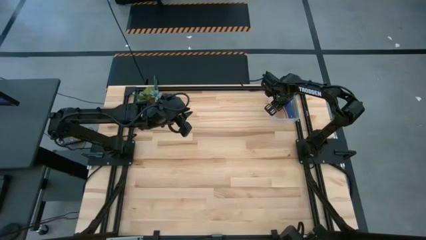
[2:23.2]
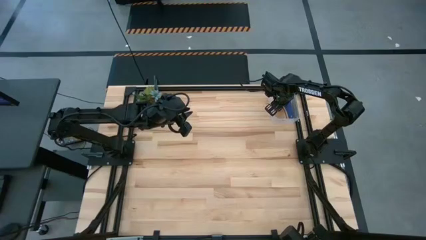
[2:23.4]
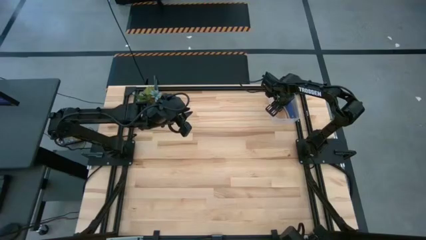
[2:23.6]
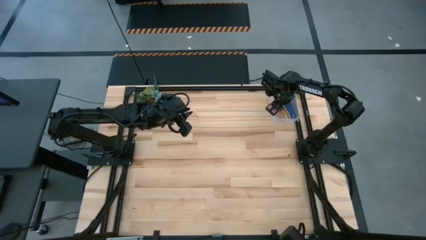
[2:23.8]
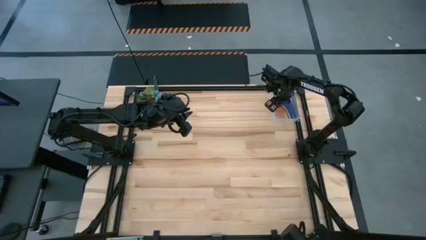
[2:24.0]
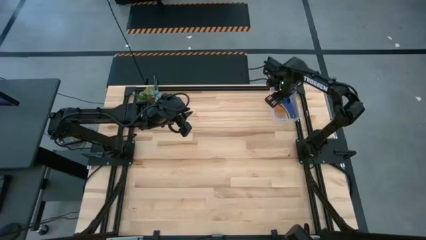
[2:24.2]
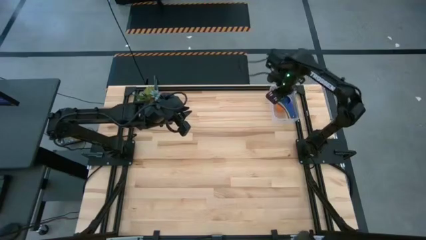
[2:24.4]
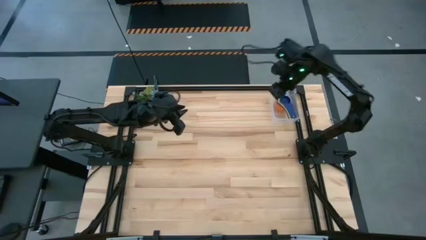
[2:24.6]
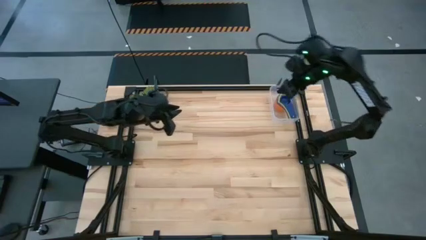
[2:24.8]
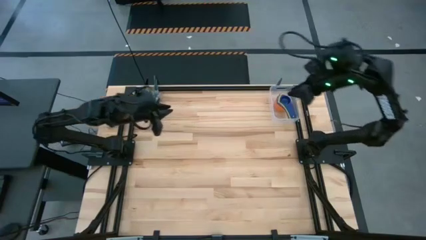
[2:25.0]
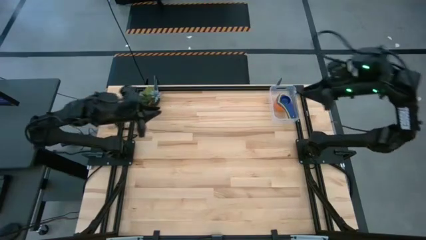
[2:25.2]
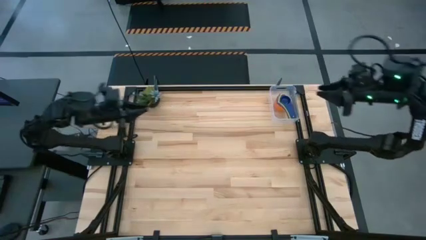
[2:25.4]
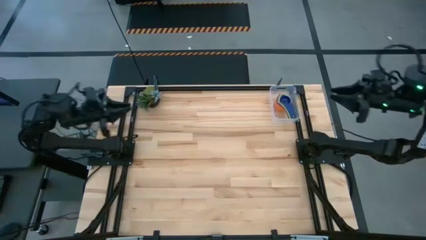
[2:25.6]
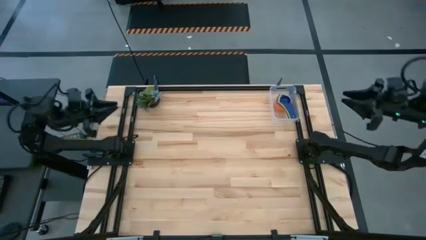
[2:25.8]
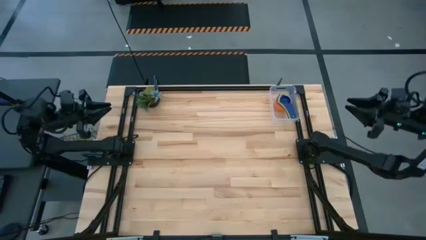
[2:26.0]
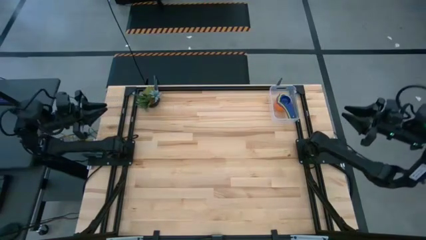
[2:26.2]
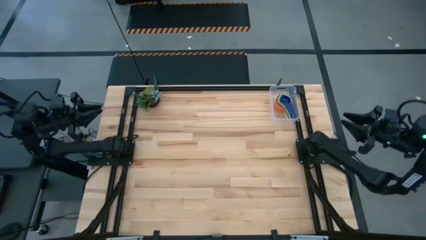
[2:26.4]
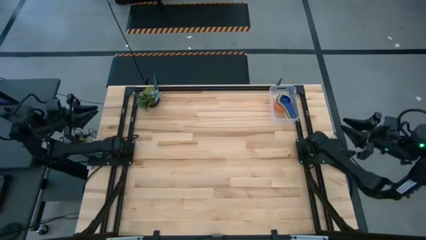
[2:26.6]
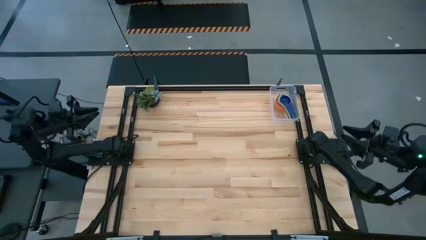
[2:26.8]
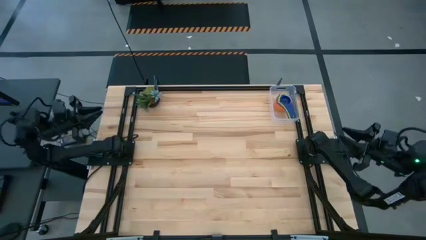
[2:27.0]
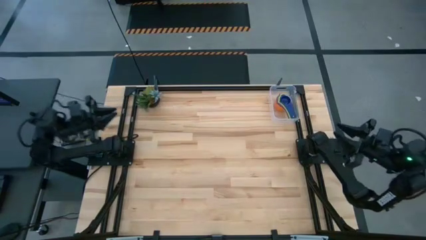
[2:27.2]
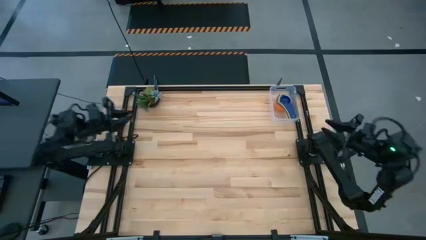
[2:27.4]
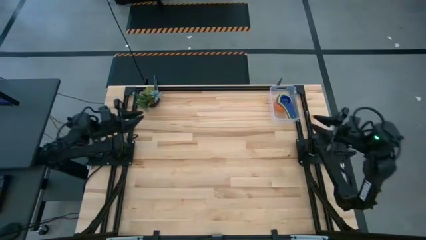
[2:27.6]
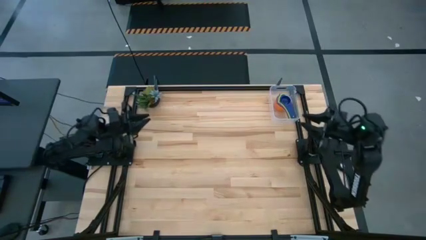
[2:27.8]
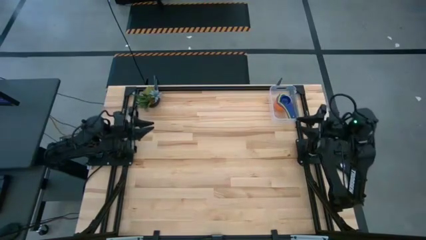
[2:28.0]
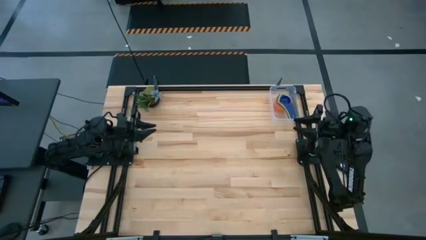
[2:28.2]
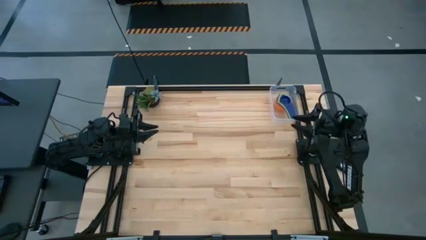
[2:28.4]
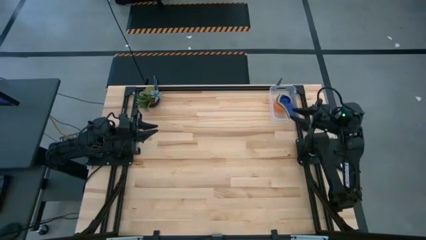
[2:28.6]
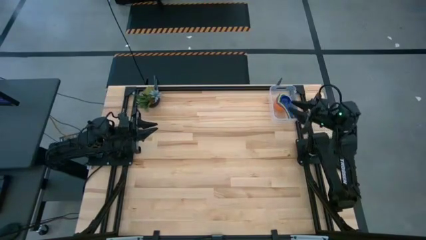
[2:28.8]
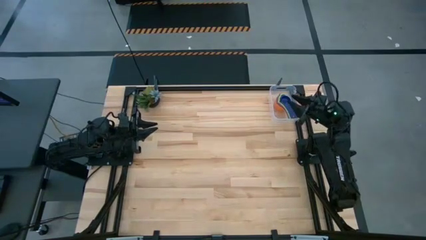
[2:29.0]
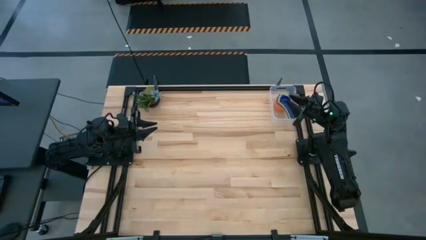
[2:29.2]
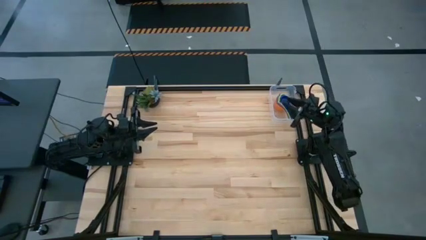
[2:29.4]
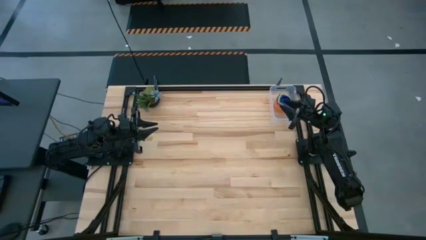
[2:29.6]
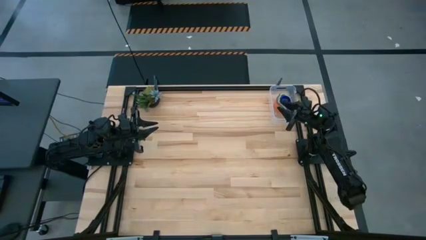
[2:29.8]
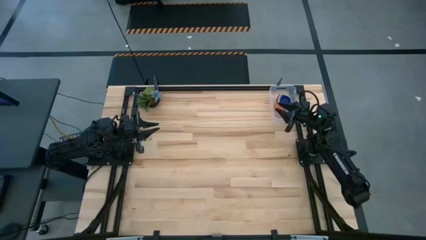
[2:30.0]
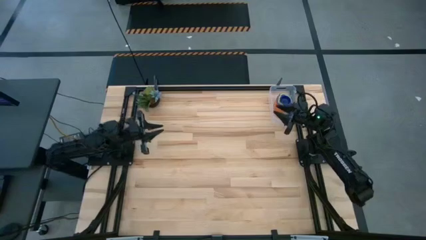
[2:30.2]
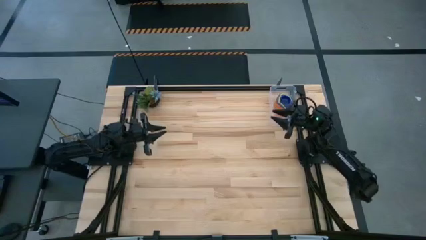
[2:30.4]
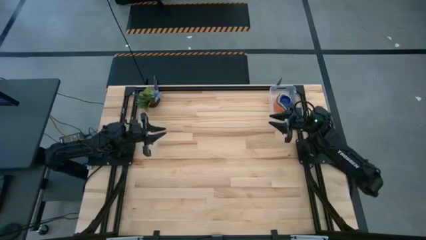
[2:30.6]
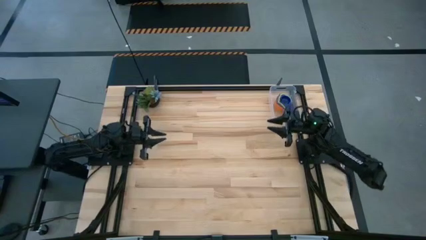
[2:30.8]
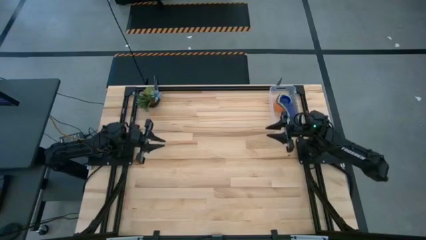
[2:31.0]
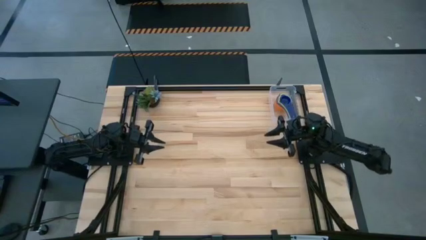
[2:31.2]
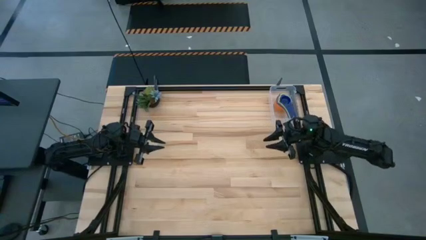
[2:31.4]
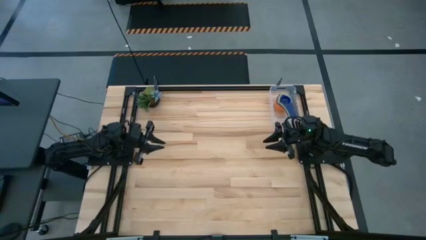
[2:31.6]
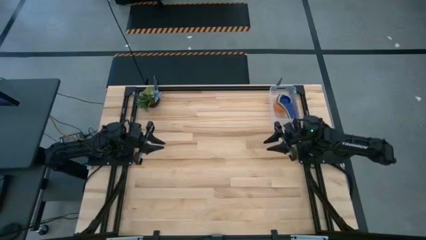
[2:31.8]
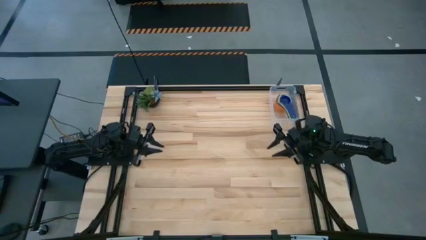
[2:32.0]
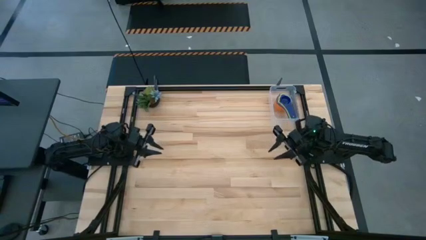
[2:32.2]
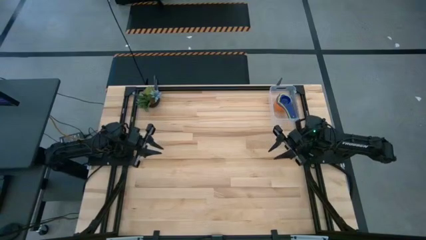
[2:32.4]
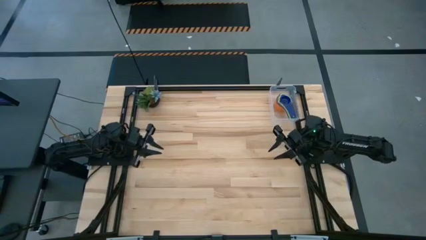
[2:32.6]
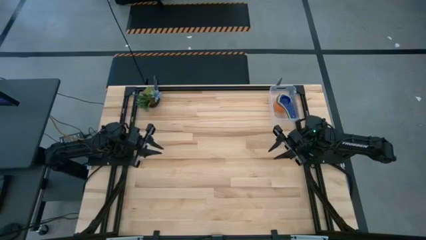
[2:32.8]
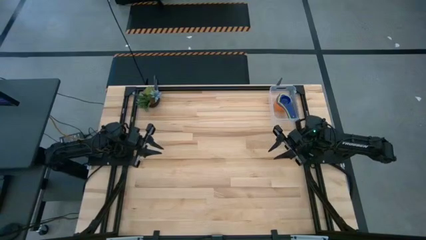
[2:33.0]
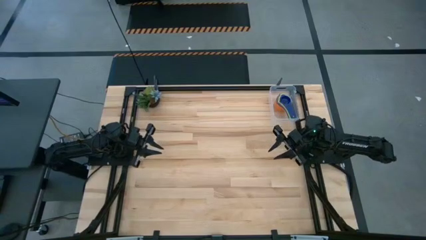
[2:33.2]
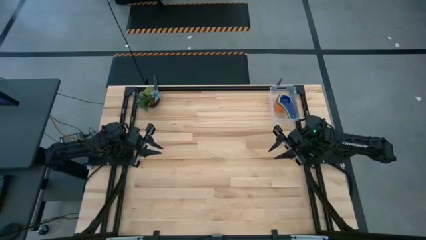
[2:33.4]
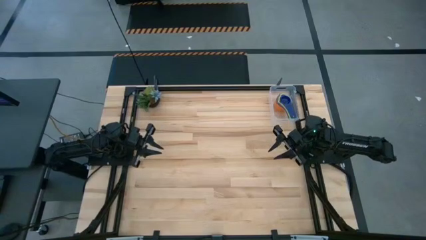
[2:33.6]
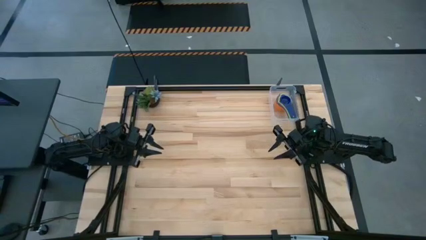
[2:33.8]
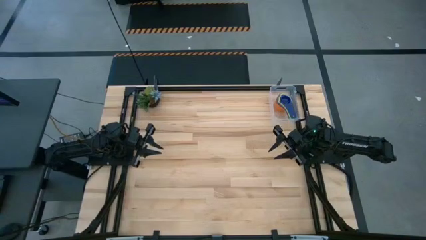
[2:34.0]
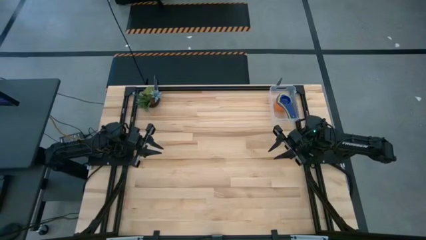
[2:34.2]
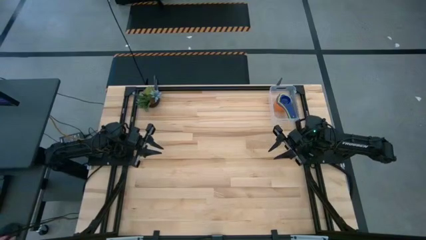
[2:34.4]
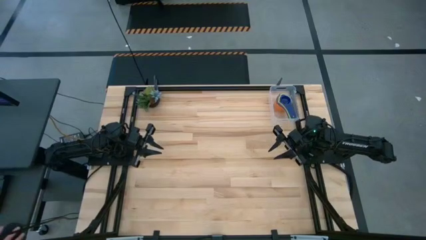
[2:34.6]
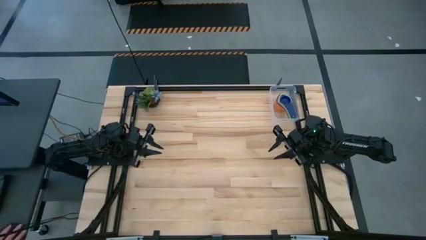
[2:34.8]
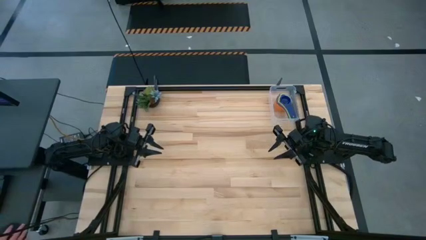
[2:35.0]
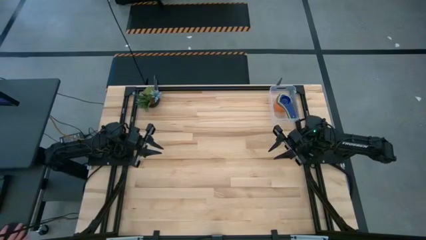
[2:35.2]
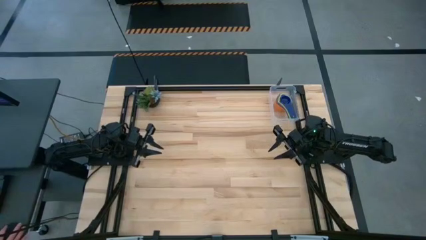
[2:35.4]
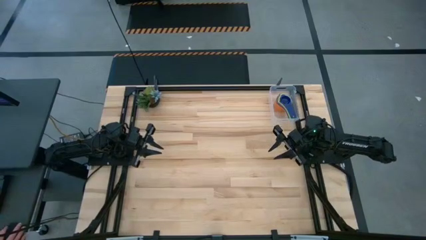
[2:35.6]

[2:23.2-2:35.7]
Task: Nest measuring cups in basket
Return to Home Position

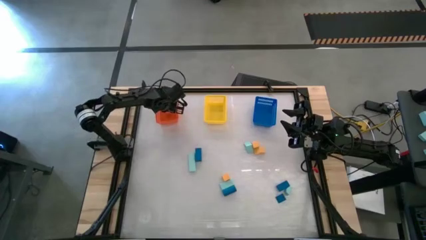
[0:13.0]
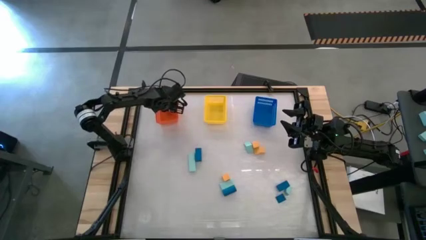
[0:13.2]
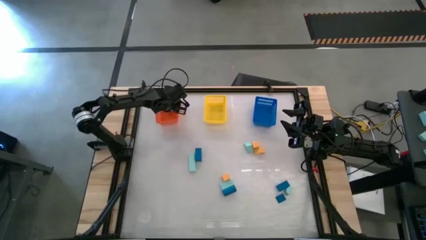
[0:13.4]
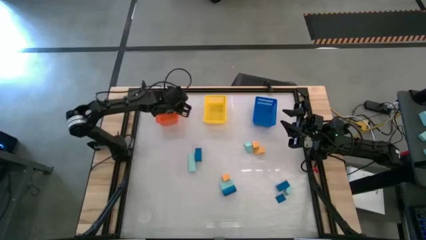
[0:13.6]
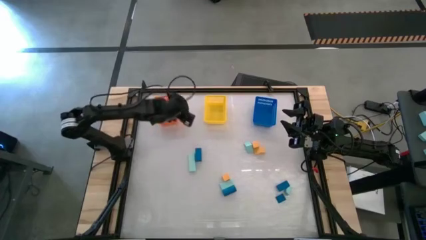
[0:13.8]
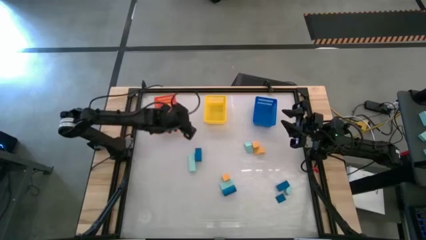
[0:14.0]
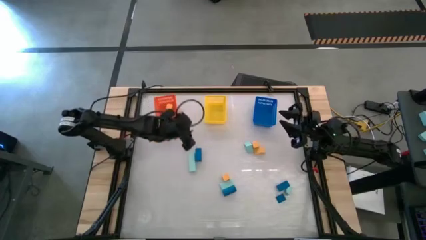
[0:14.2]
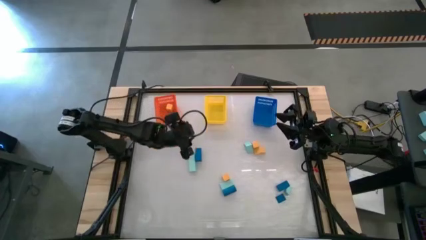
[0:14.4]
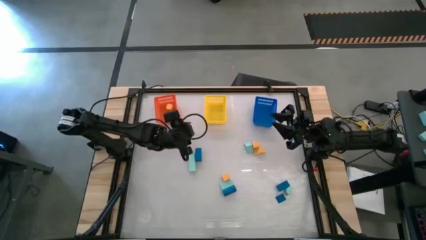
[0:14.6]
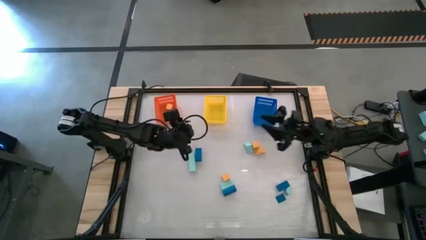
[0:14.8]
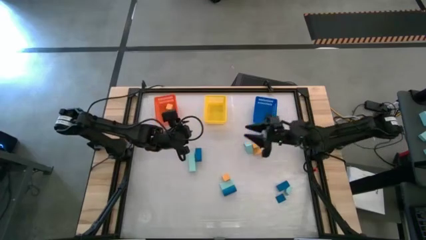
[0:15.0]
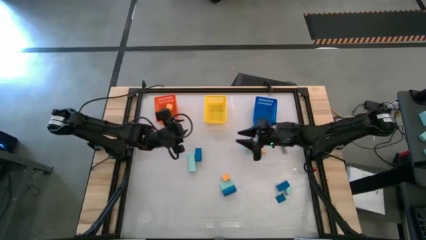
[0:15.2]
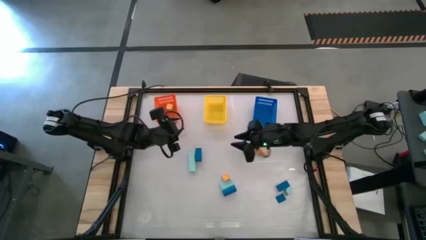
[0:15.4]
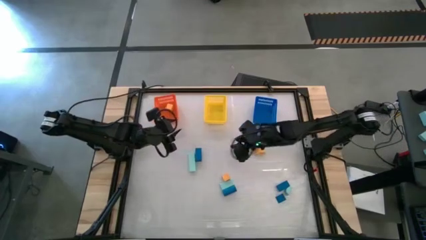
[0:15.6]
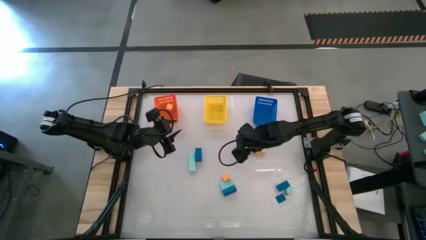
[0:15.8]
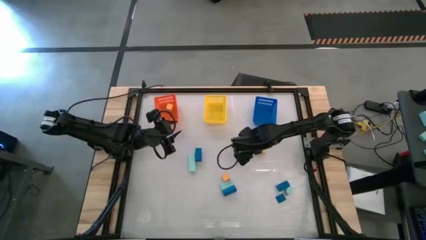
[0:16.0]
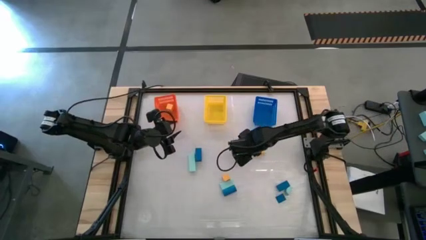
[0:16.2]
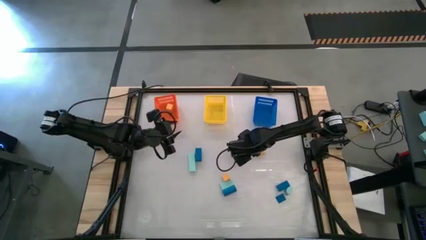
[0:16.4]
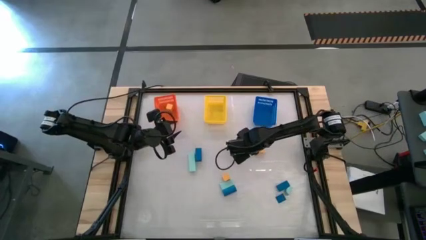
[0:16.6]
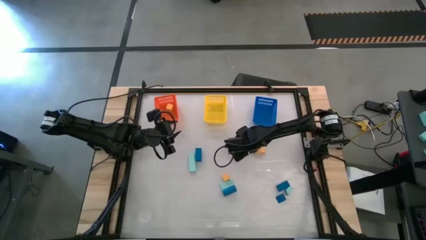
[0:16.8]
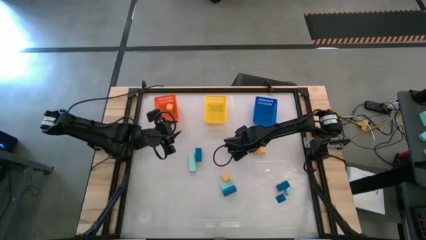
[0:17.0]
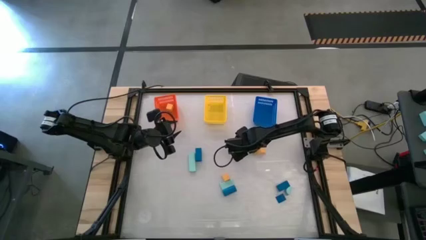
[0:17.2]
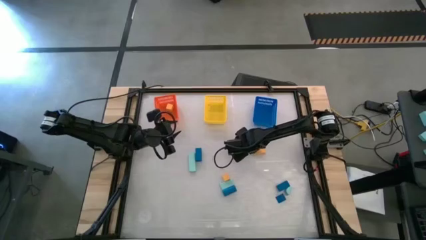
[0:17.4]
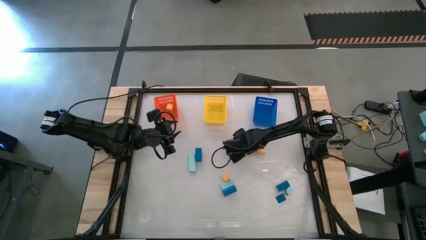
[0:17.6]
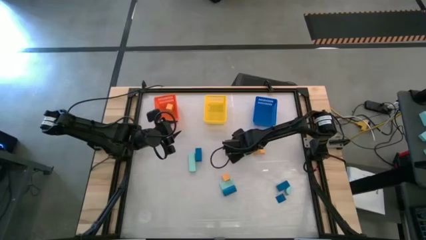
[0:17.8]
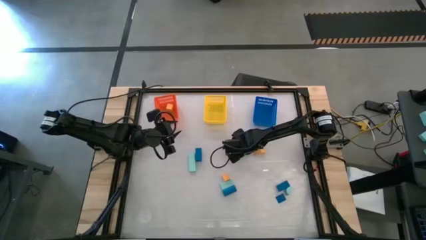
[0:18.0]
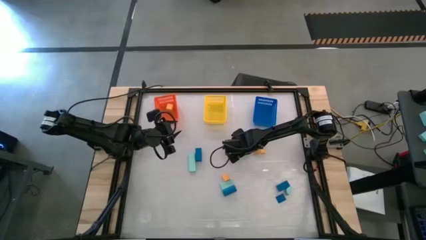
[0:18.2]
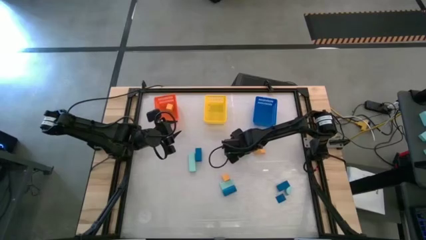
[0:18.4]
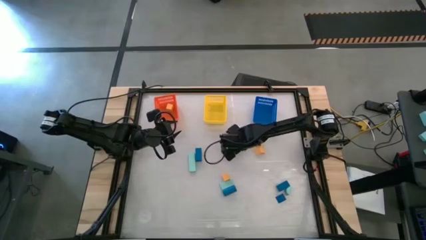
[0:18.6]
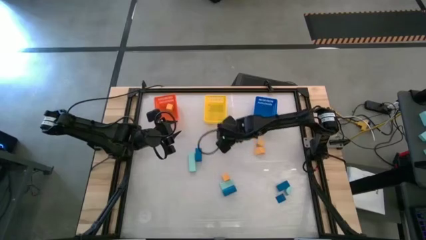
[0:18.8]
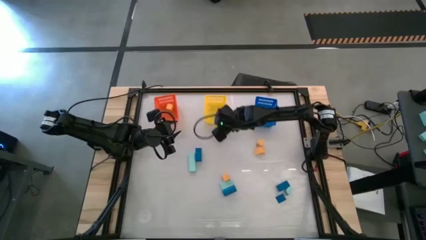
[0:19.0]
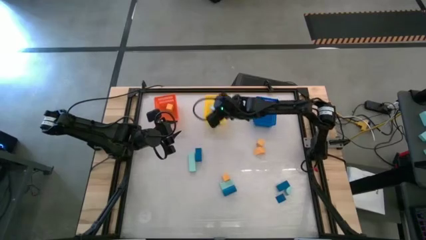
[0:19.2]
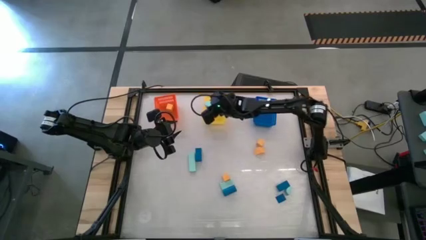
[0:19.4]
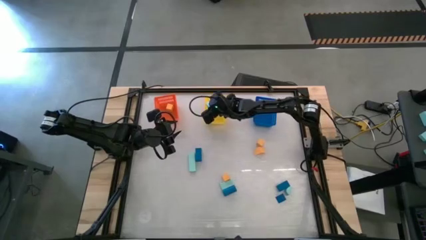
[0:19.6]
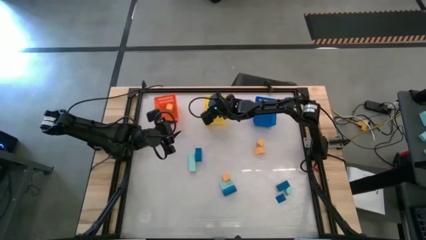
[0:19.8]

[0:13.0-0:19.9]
Task: Sort & place blocks by color
Put the light blue block into the yellow bin
